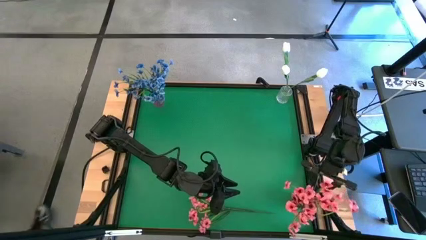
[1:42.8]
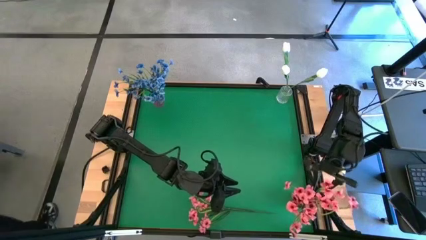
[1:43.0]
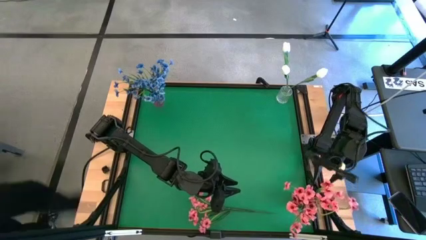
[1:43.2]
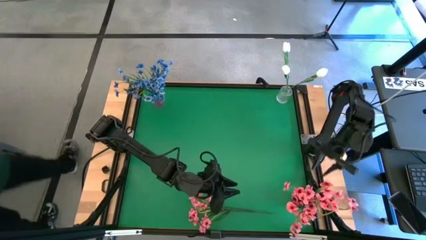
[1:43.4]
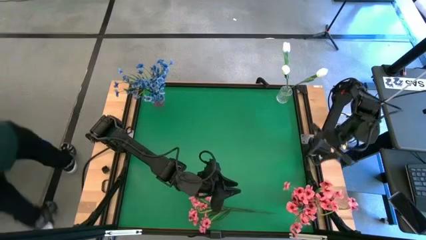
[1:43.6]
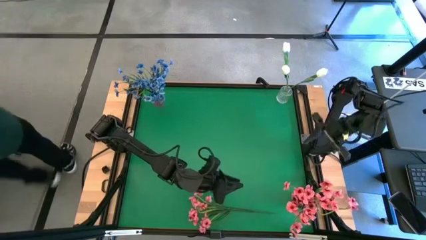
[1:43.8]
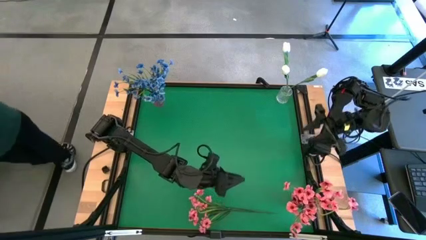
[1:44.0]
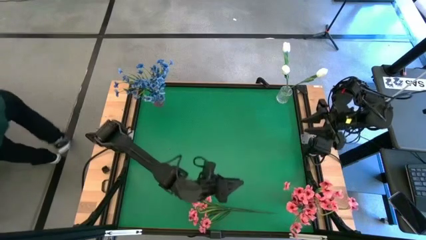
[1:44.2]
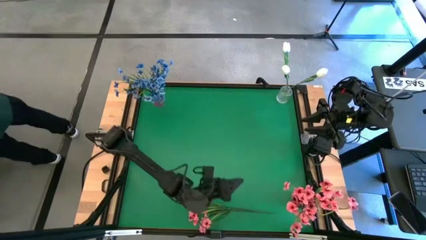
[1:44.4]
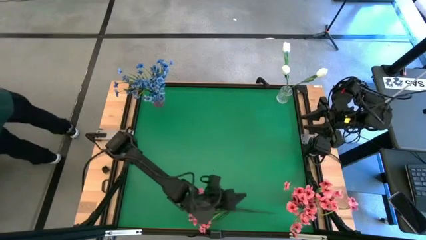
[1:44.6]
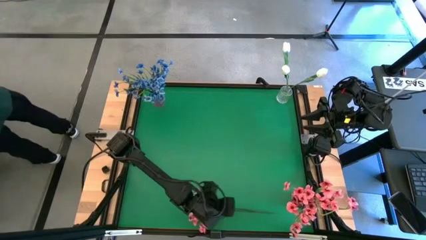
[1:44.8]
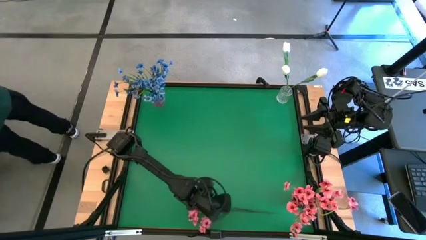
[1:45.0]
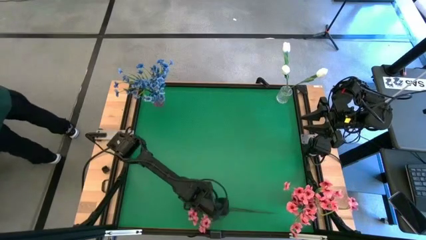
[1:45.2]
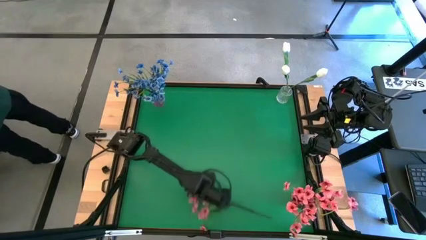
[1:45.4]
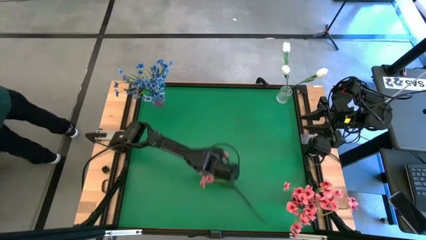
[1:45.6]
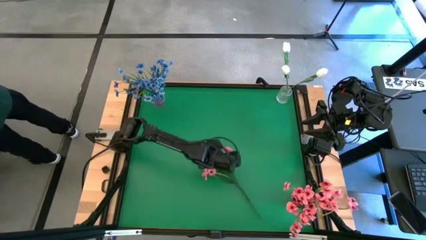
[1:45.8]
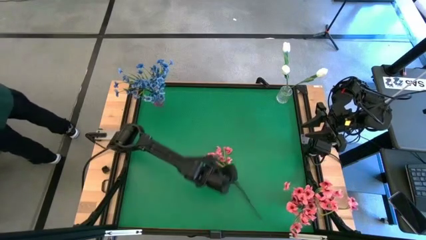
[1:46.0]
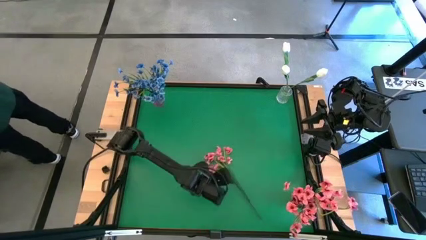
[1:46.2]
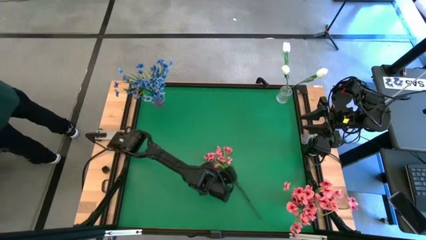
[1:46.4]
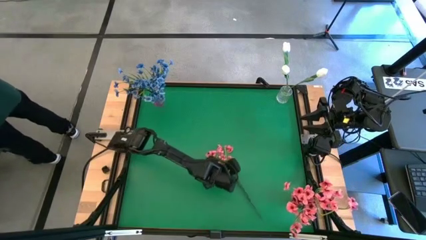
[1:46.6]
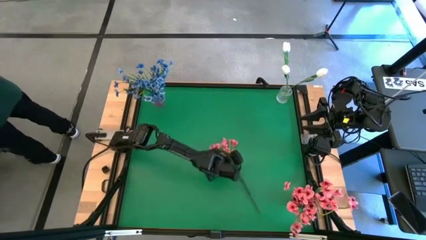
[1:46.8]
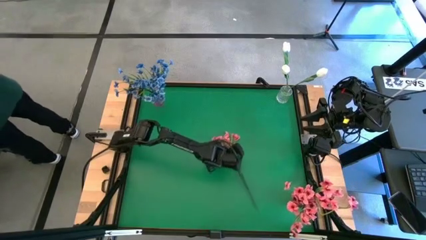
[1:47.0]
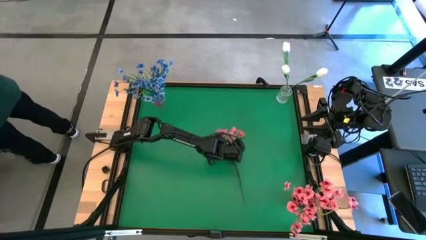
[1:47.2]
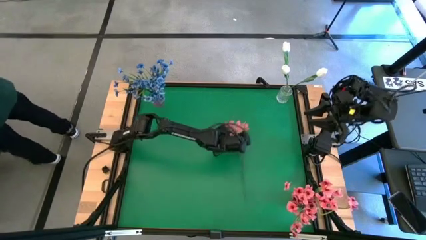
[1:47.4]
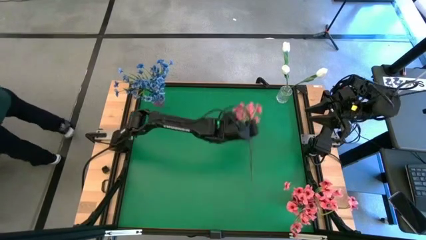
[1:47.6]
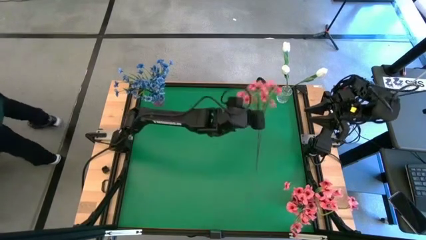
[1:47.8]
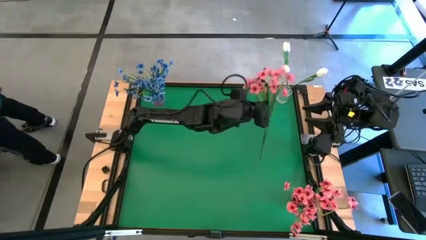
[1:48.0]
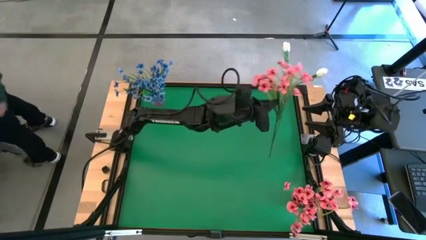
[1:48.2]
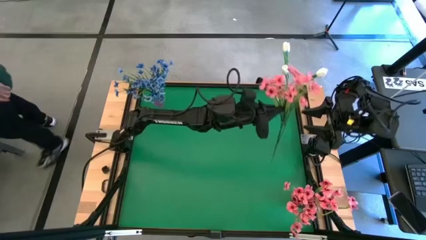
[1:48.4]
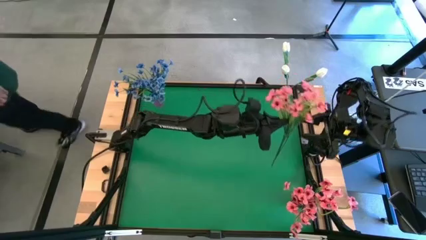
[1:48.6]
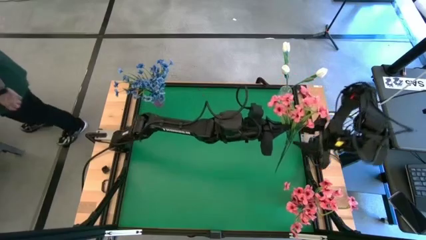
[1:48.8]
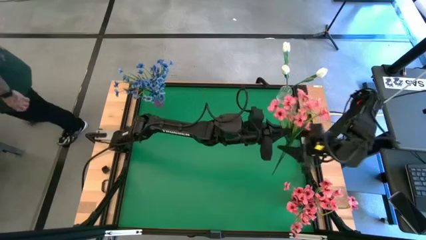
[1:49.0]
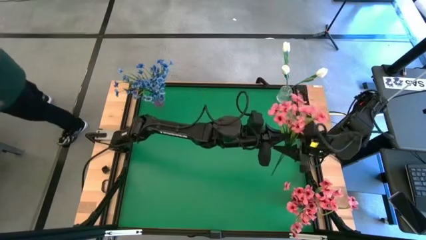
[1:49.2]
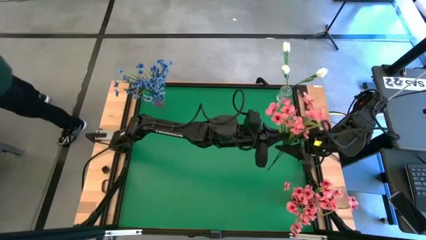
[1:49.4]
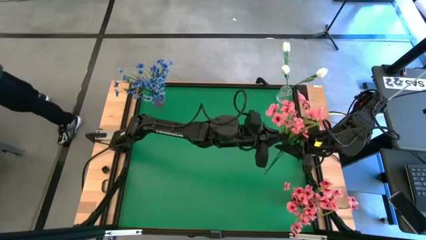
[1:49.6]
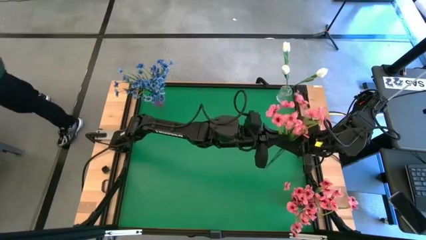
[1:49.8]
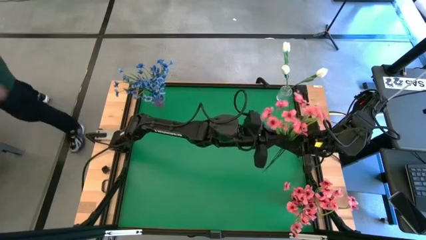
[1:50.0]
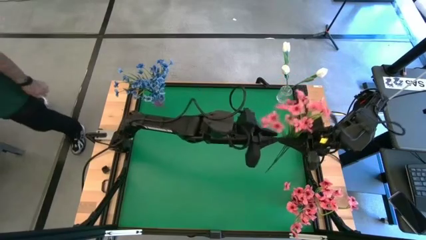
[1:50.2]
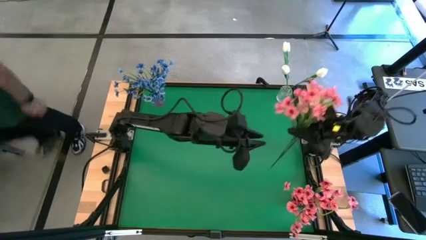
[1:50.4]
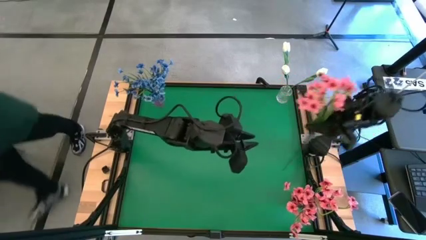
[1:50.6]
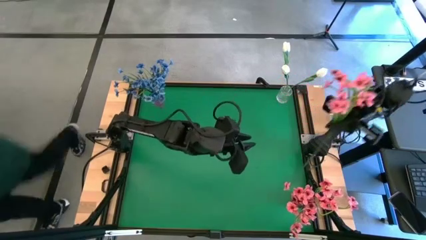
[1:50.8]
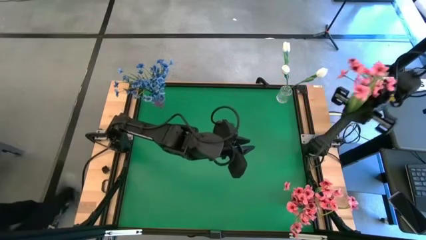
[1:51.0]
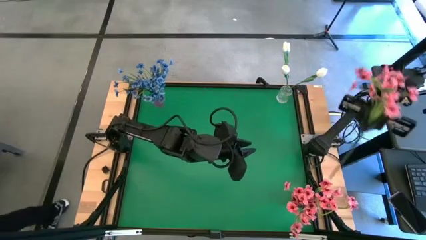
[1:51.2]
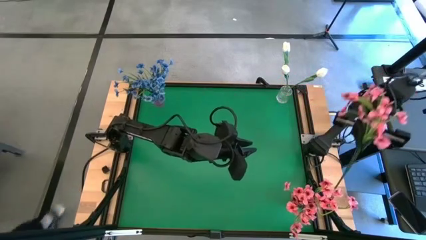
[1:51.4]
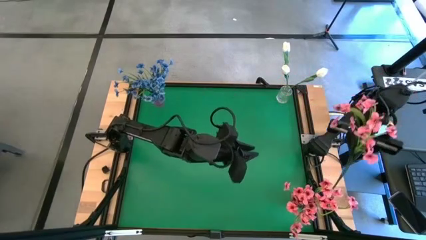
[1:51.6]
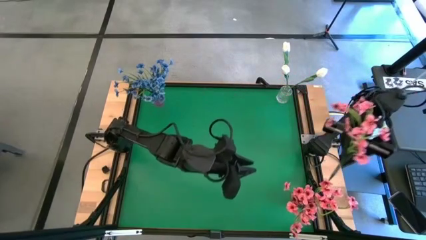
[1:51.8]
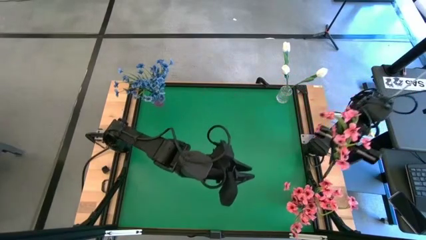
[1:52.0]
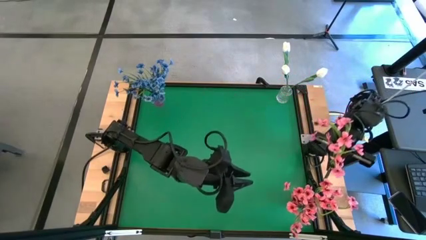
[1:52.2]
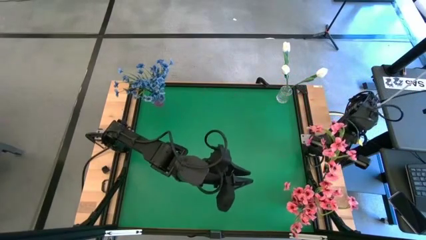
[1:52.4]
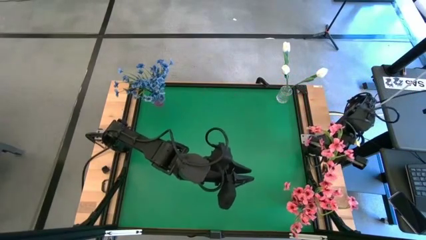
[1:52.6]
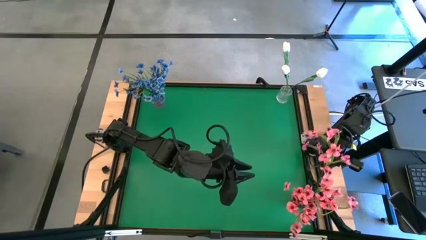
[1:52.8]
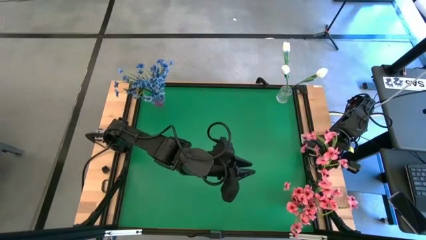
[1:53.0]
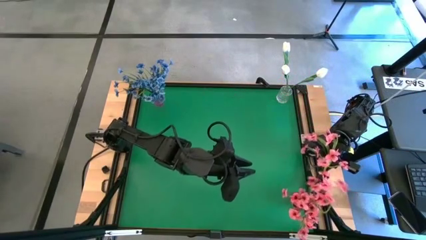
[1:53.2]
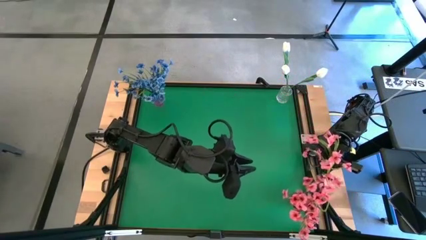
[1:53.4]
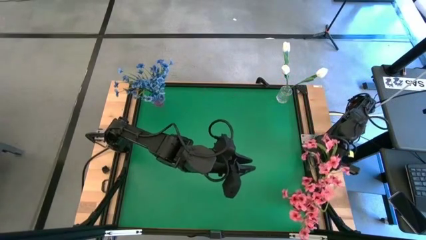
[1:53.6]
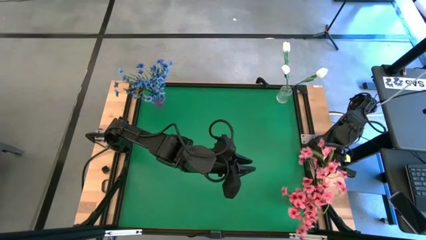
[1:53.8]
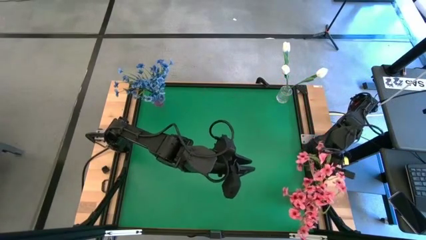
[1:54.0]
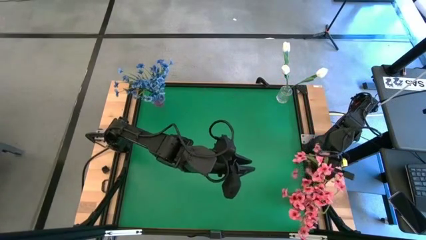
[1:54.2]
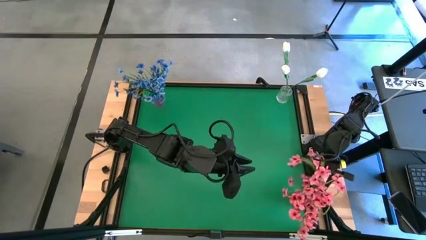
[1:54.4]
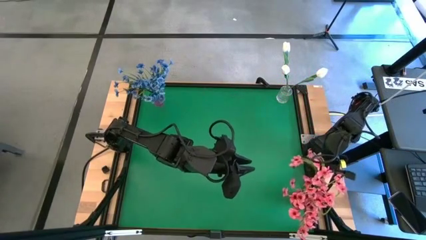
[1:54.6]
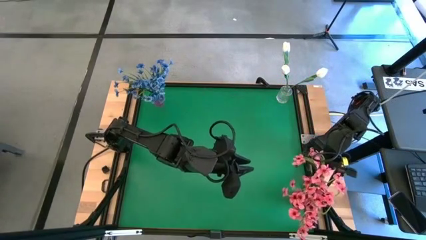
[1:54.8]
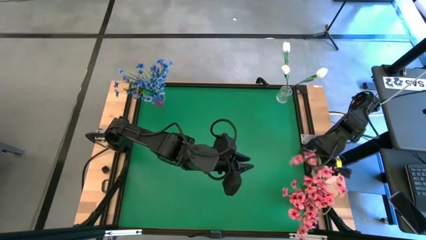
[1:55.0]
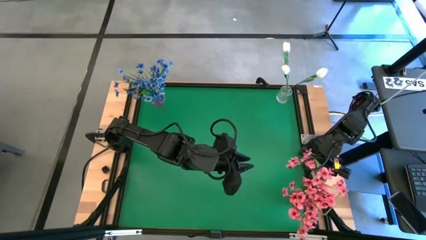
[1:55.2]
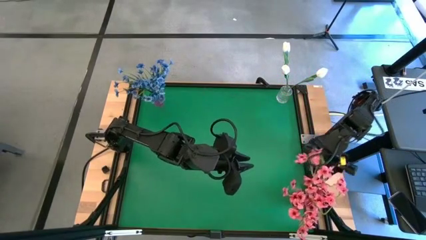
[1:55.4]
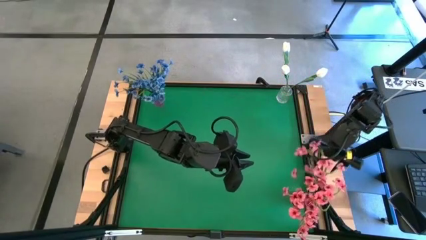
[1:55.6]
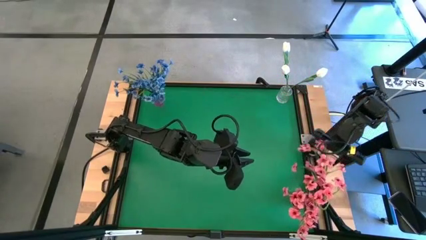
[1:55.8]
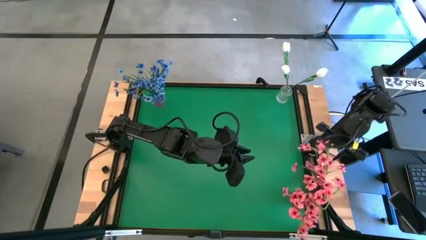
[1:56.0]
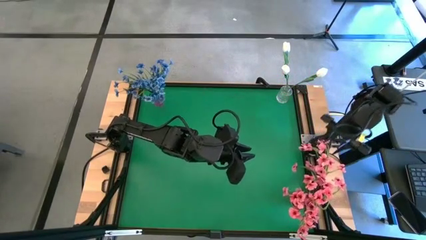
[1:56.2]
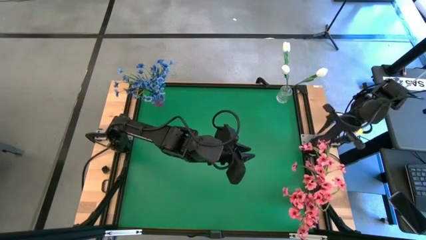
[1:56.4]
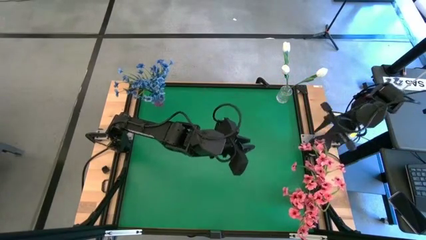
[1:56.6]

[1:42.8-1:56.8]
Task: Sort flowers into vase by color
Put the pink flowers into the red vase

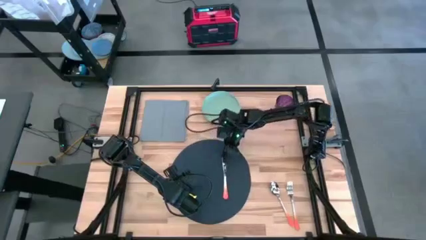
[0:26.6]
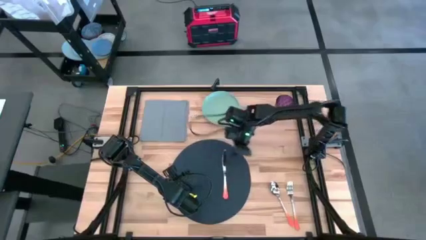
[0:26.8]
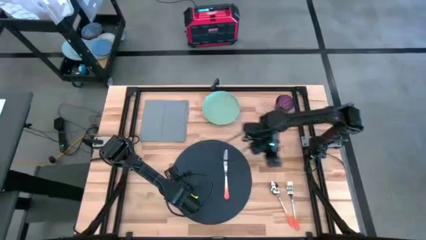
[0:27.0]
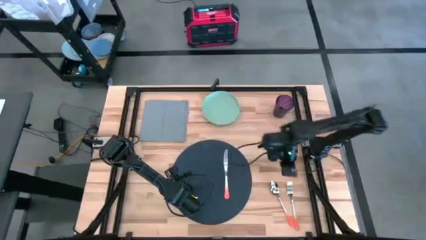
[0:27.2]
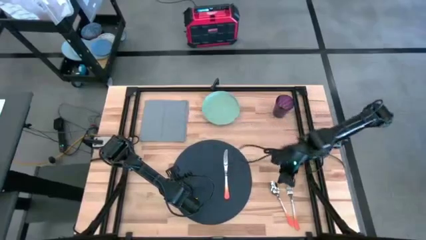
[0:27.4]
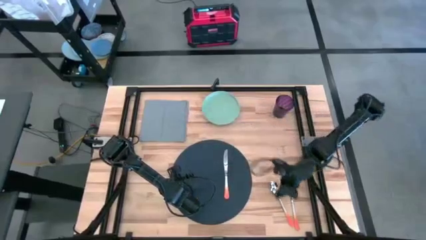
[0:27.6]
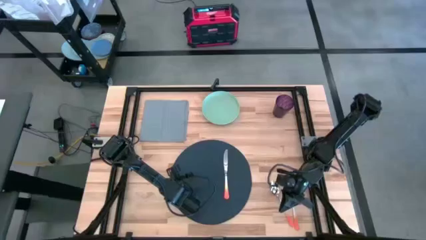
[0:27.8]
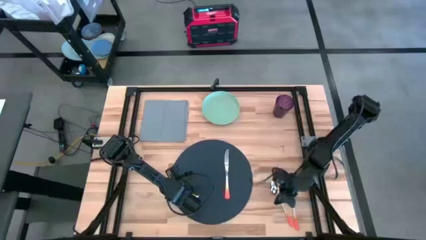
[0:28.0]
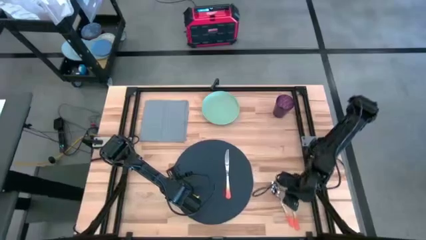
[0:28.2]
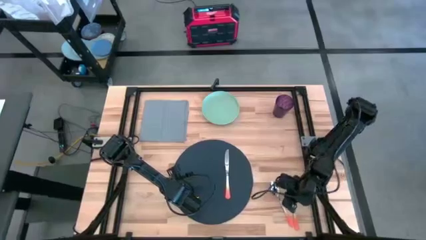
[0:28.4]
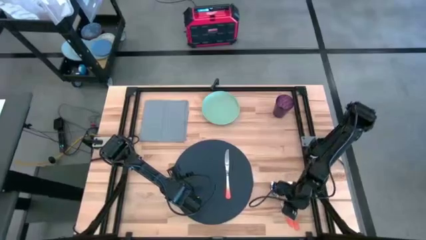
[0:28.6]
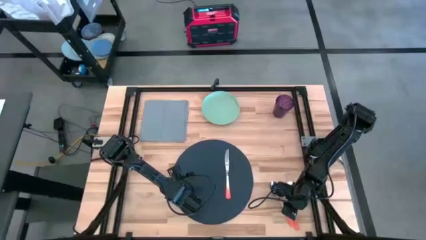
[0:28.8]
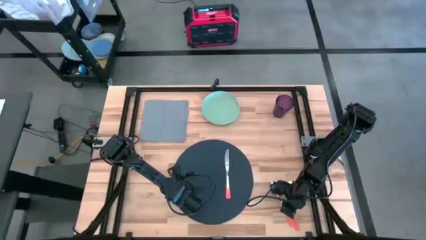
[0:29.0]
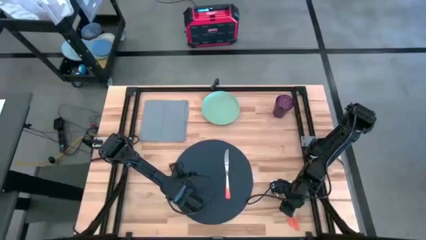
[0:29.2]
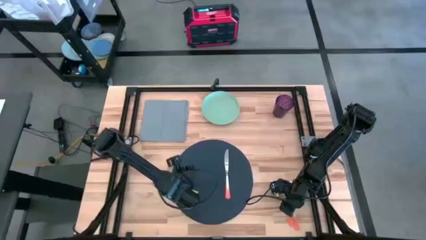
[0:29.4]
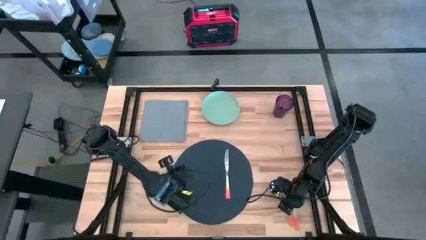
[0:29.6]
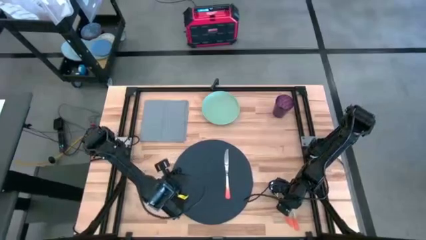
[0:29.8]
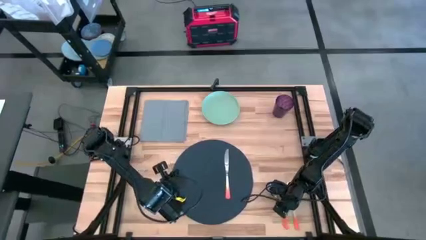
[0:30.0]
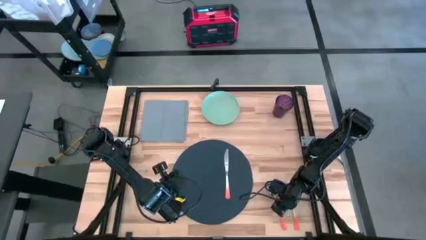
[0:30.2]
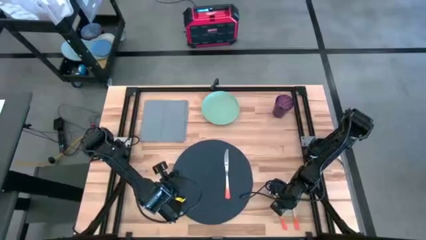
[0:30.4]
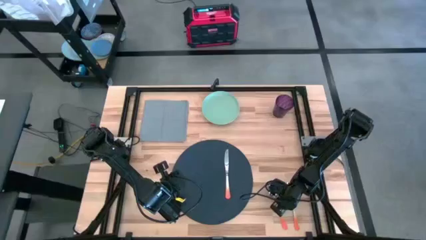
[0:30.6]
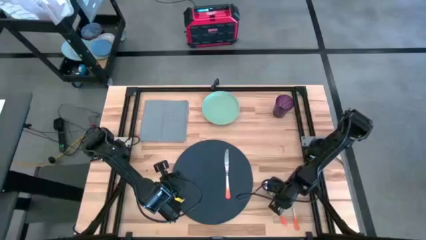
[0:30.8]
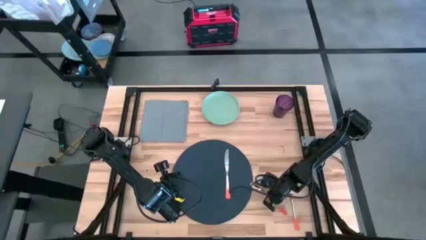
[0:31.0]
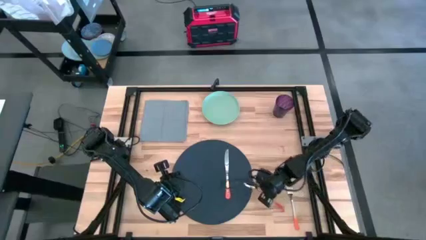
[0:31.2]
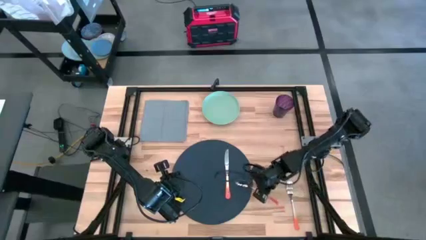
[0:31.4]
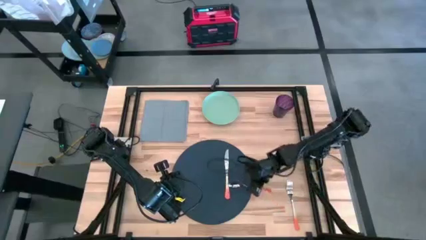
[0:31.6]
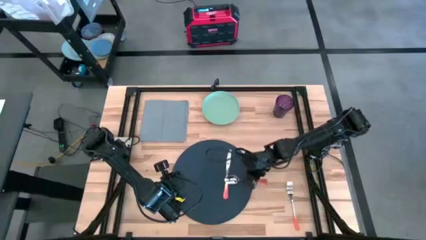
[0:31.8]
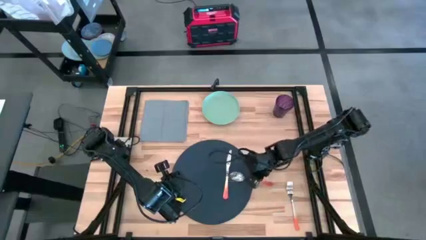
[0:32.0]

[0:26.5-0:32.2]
Task: Set table place
Put the orange spoon on the dark gray placemat to the right of the orange table knife
